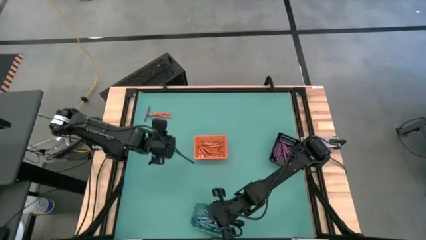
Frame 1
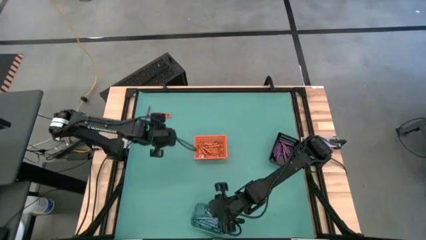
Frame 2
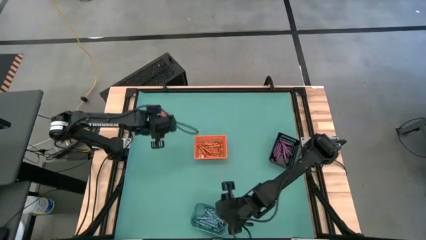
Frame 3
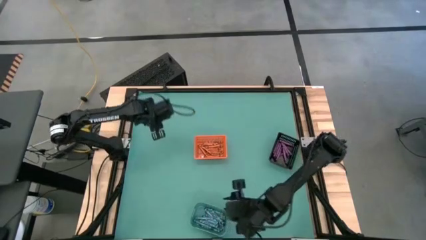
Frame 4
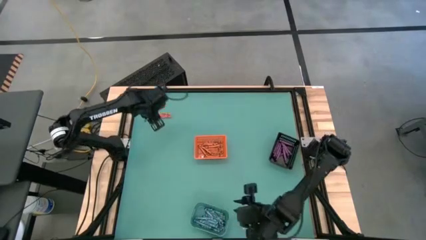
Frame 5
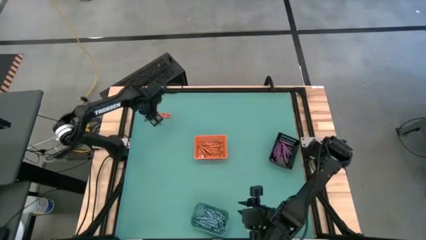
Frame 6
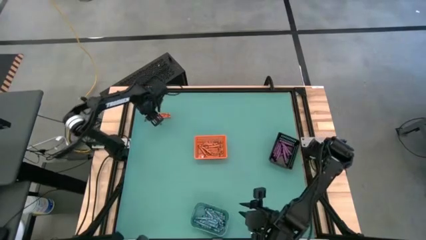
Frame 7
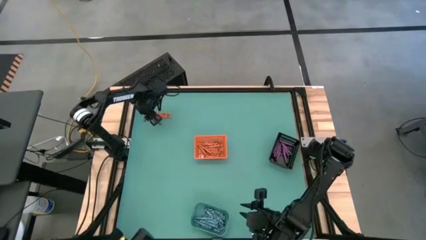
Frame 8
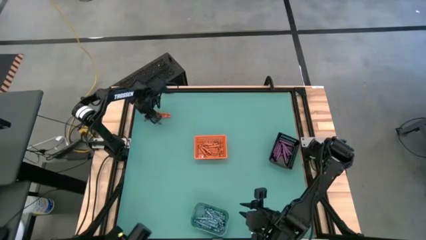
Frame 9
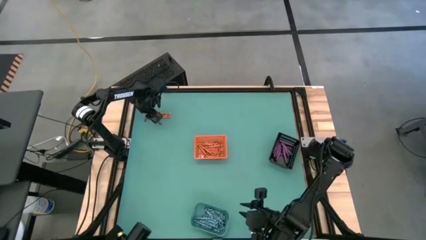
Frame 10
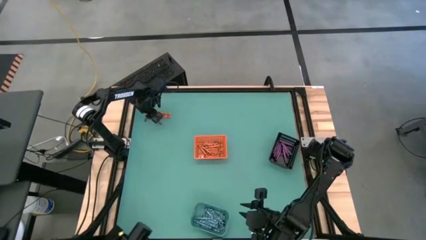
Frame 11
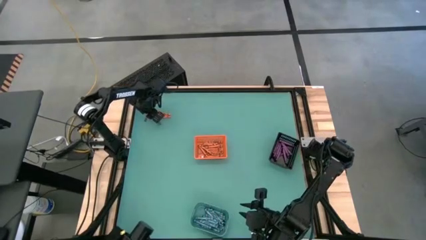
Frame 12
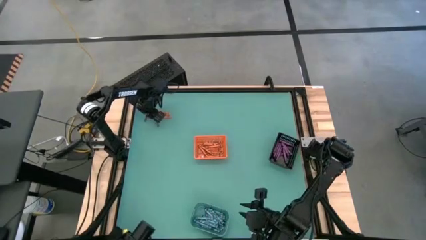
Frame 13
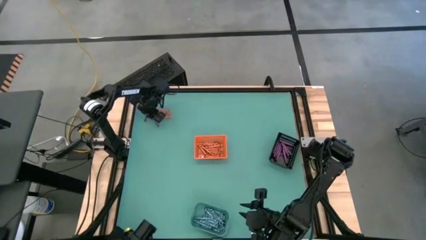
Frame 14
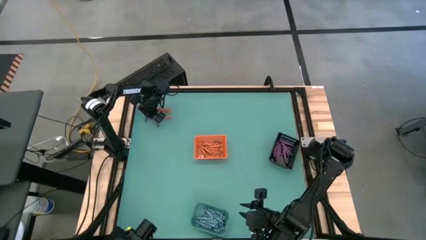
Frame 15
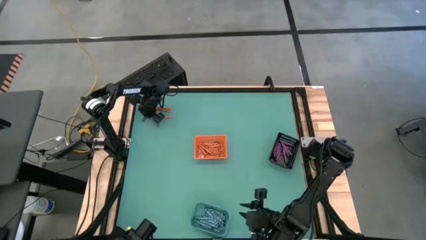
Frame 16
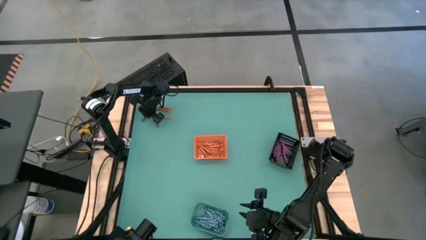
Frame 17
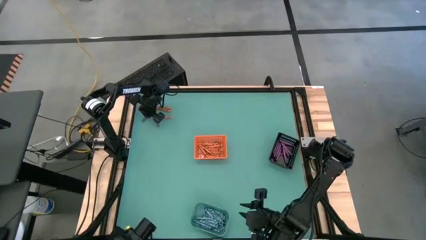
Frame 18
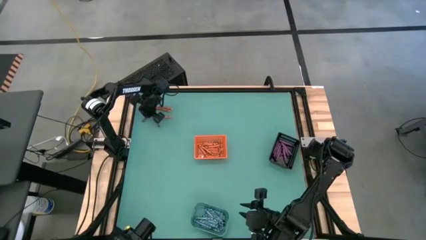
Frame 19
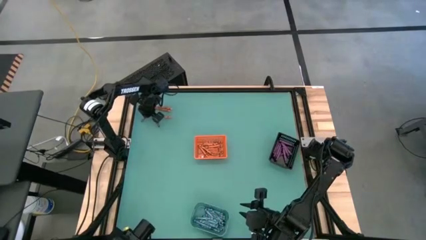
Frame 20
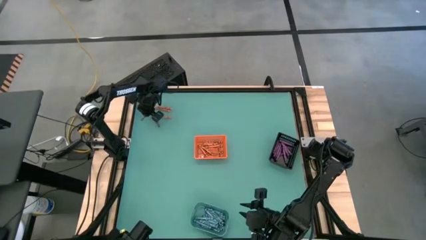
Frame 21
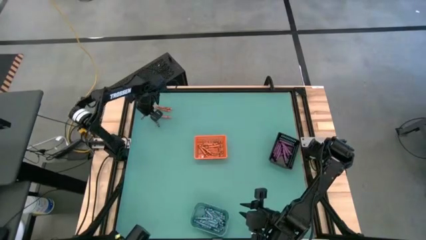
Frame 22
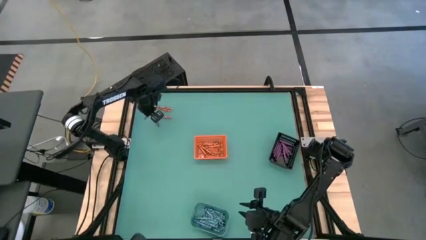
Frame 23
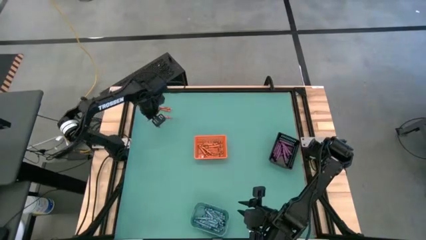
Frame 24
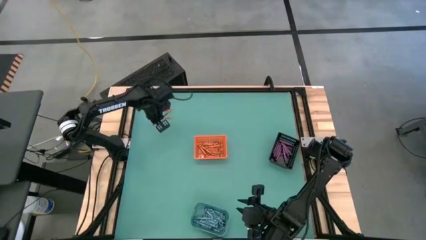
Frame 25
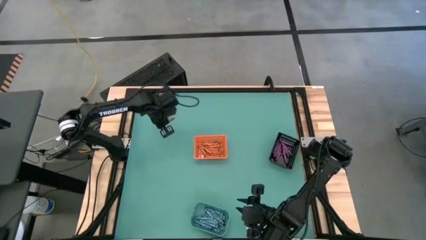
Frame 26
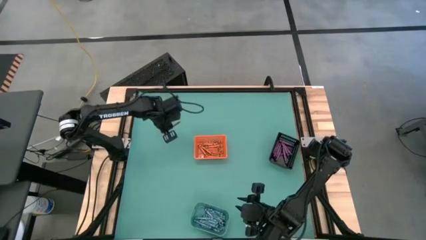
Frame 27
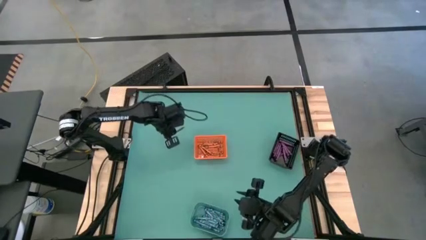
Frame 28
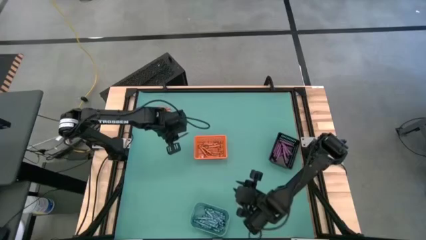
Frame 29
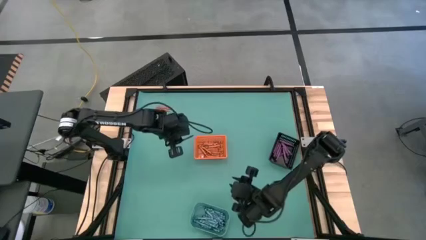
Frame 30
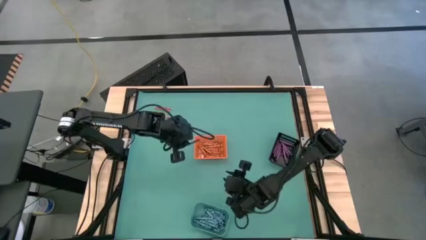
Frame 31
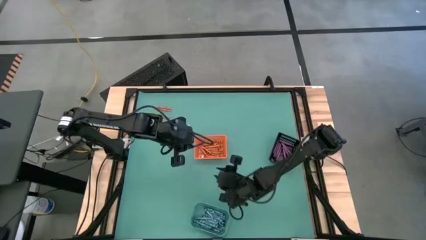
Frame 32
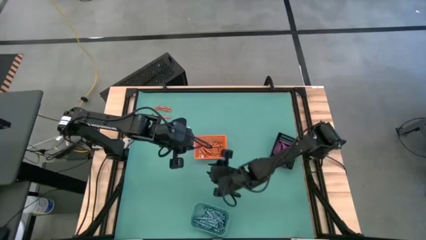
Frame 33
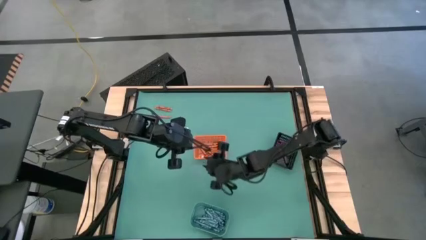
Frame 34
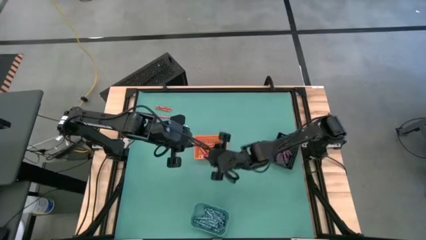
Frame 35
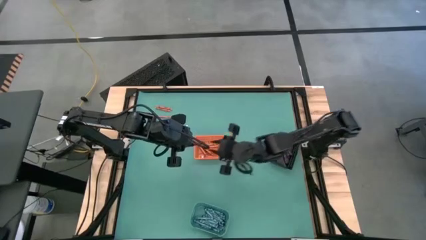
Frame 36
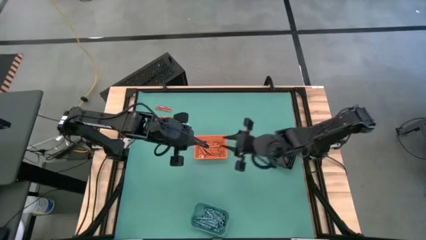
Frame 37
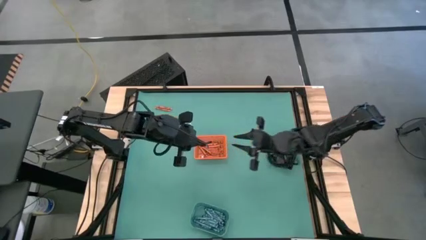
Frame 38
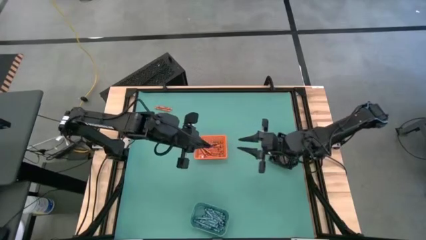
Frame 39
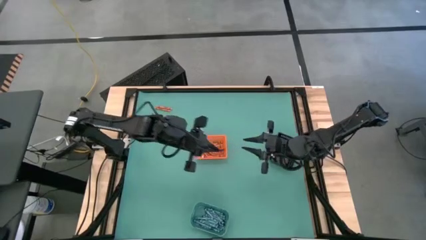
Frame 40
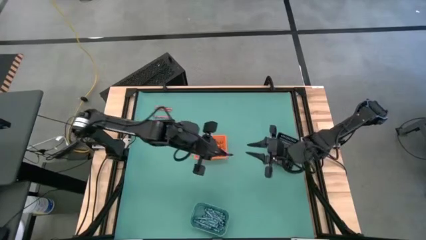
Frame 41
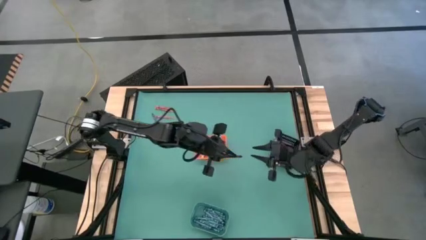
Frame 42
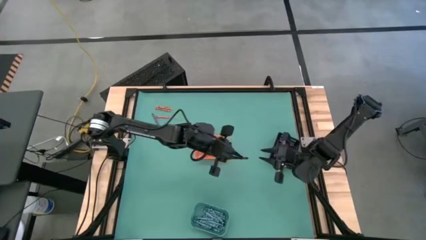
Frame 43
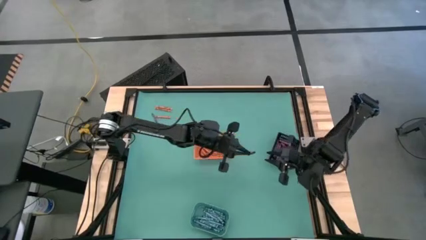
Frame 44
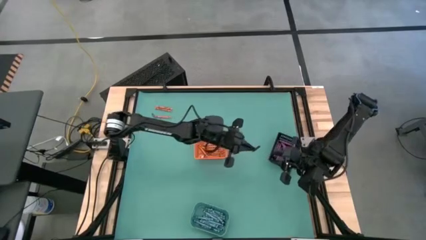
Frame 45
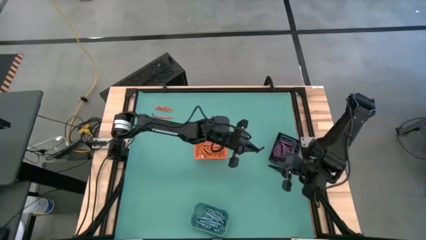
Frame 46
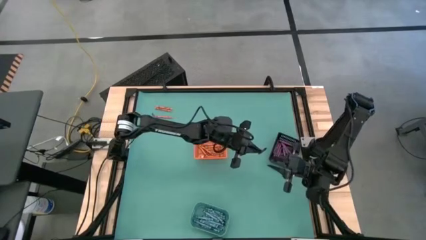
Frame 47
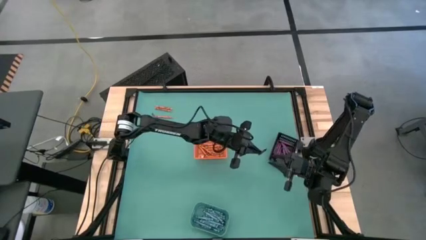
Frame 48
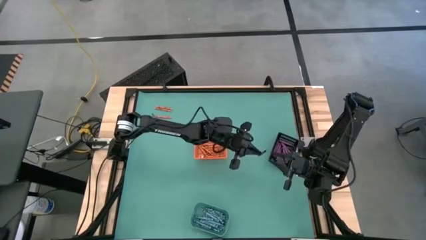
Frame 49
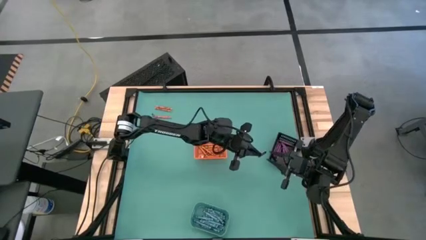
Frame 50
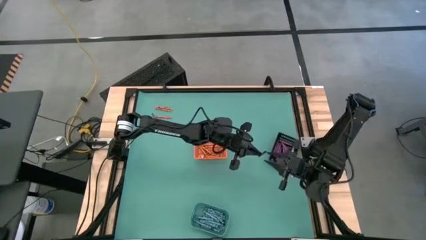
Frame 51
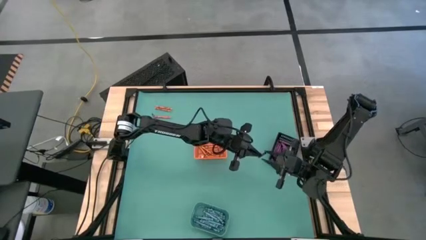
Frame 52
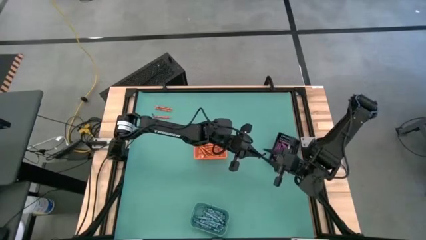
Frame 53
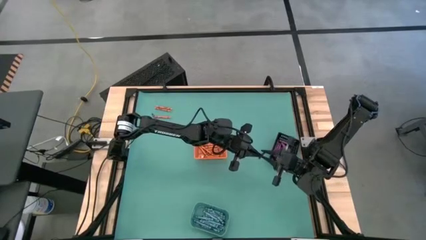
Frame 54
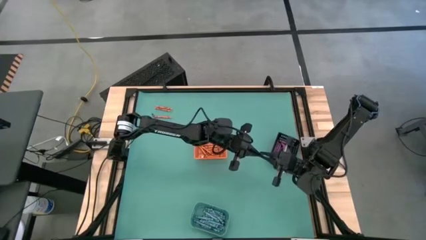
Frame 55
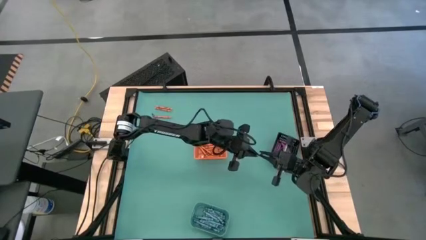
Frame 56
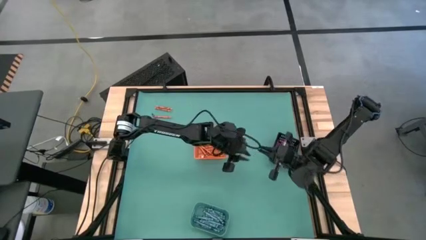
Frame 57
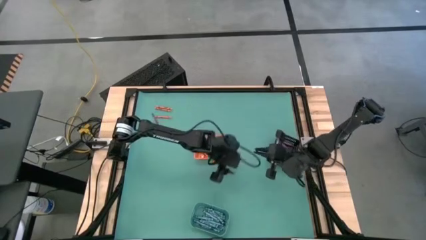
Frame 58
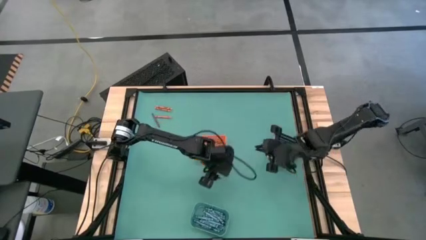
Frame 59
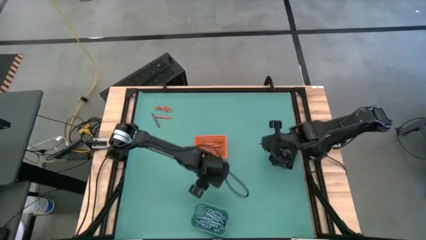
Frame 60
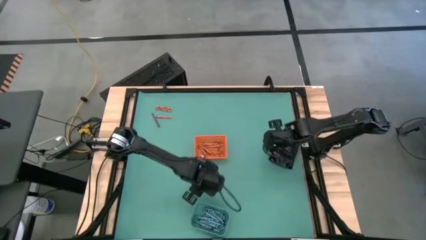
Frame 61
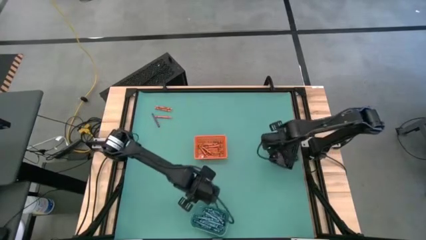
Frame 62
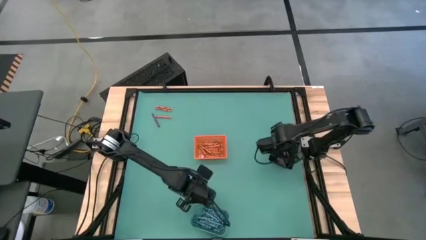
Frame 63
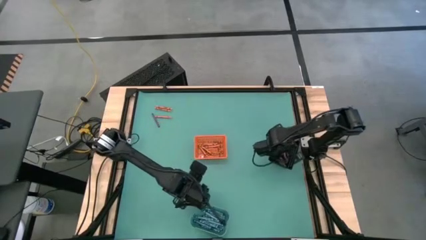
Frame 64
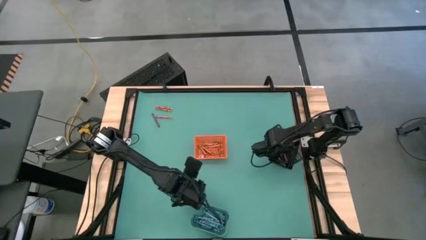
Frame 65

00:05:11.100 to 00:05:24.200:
Task: Sort crayons
Put the purple crayon into the black bin

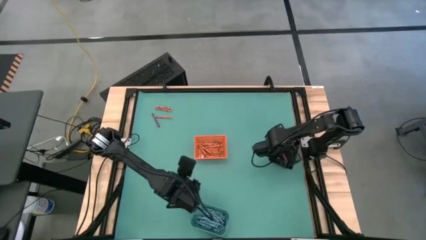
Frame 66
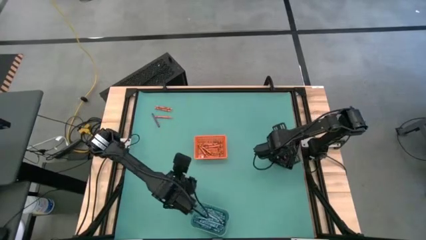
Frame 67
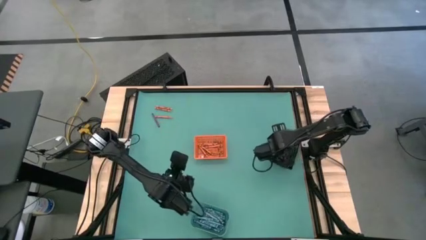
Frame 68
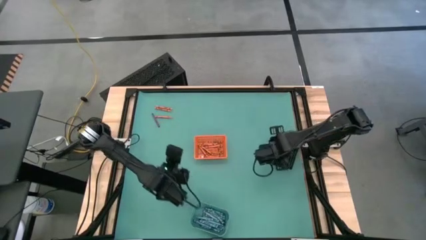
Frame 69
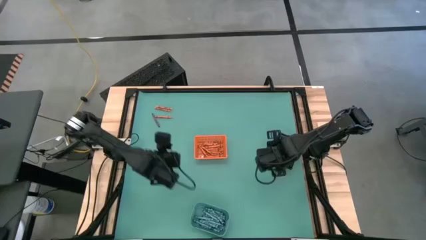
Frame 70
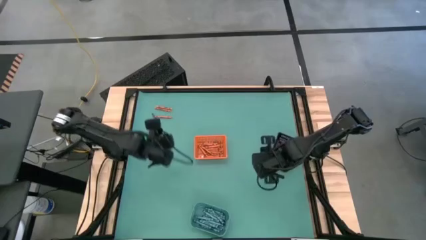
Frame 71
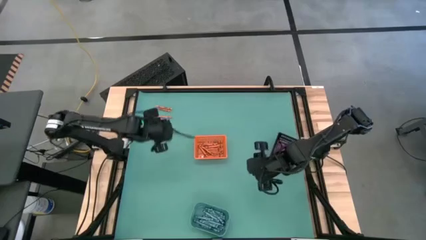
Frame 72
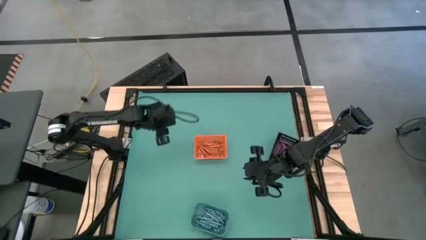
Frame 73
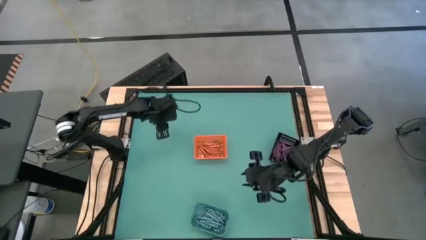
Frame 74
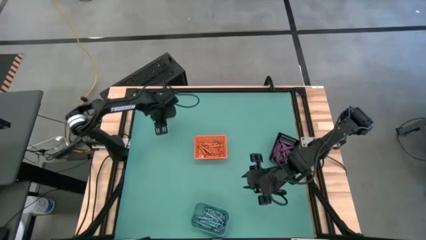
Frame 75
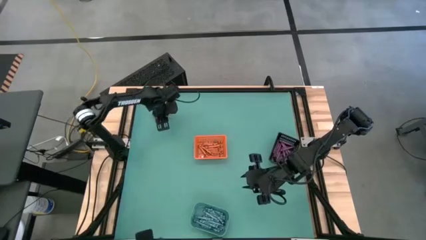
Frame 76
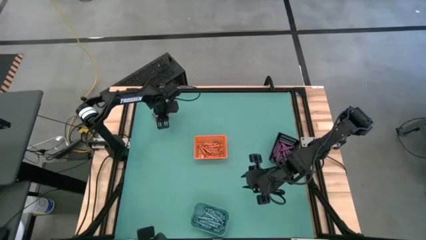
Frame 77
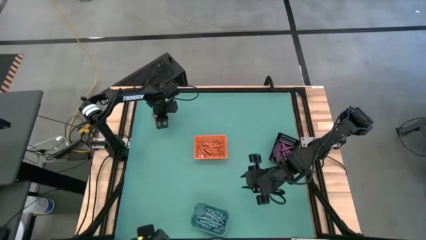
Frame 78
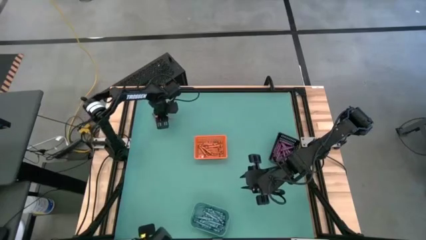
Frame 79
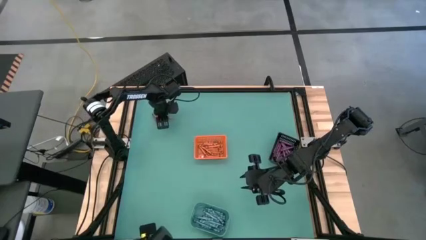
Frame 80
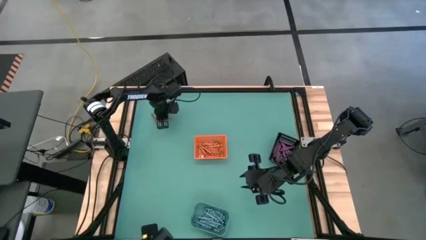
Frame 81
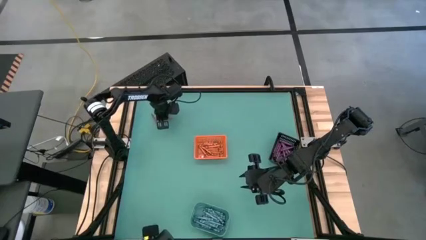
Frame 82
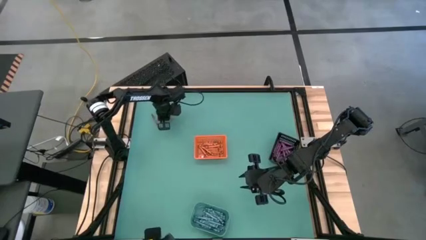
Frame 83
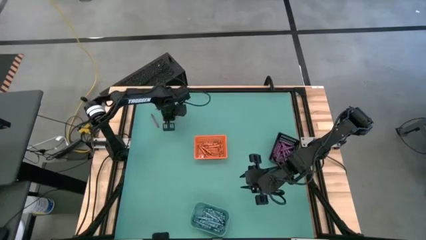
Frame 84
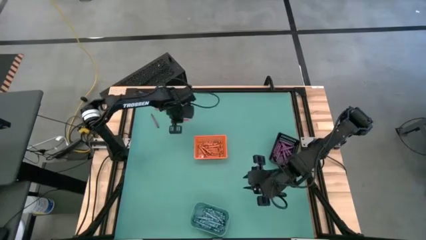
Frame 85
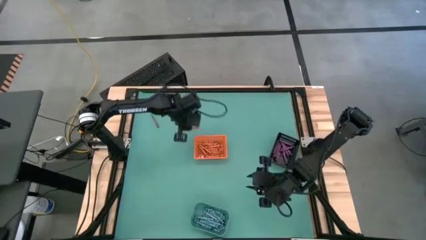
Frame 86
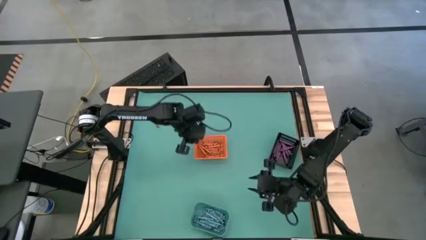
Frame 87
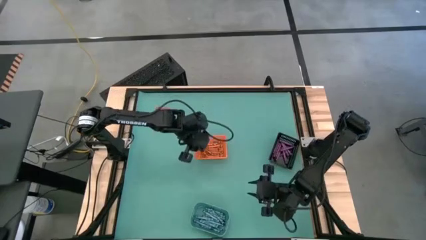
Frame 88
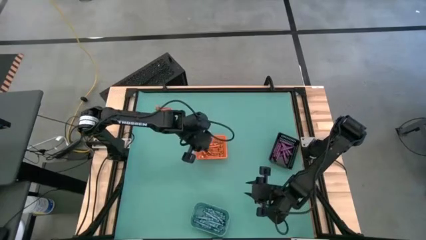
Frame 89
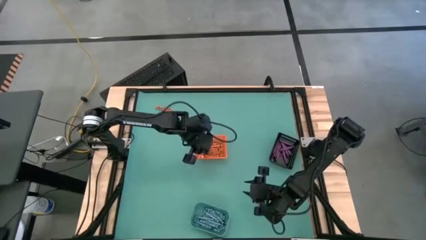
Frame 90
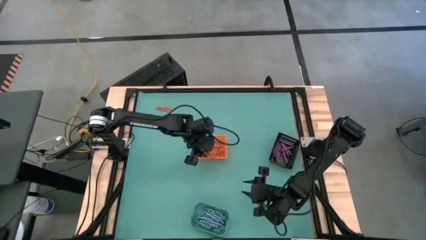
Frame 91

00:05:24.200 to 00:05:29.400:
Put the orange crayon into the orange bin
